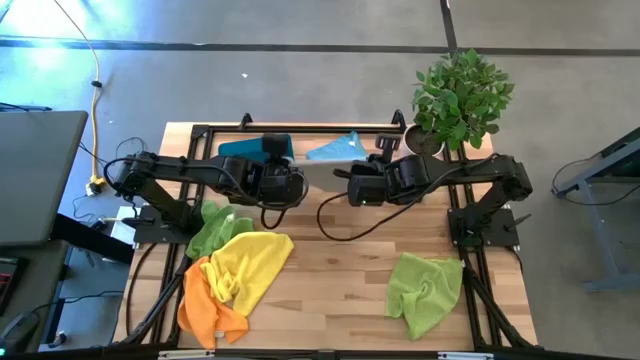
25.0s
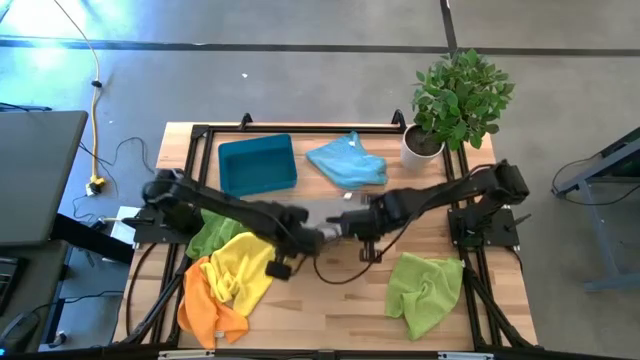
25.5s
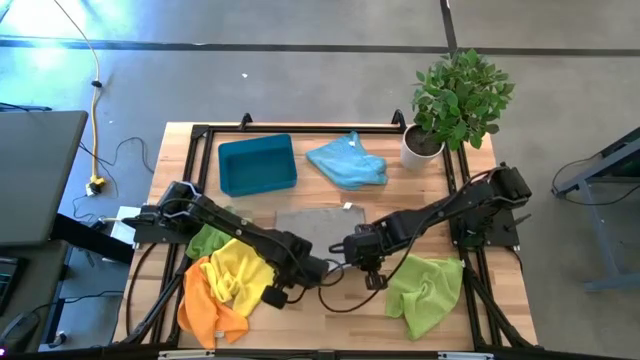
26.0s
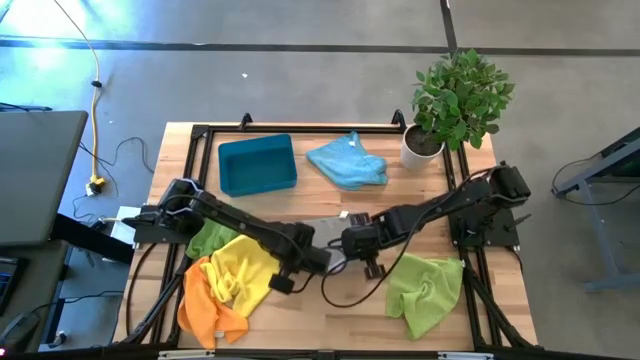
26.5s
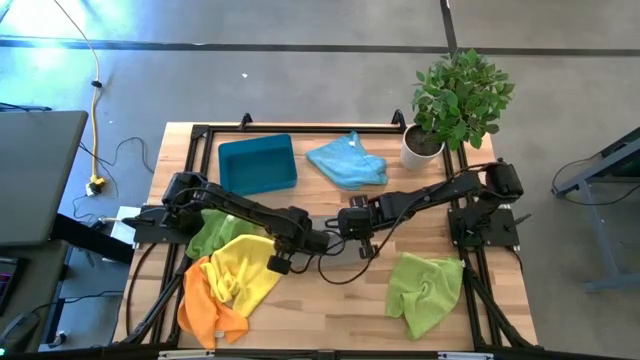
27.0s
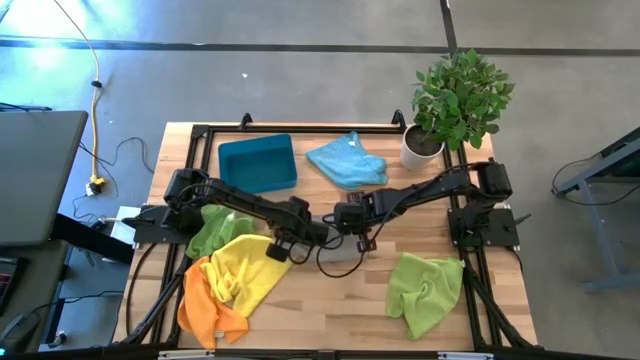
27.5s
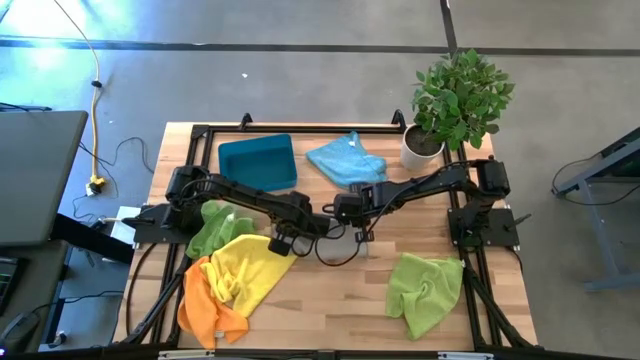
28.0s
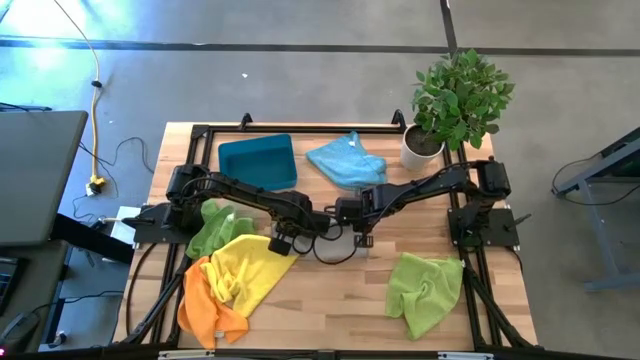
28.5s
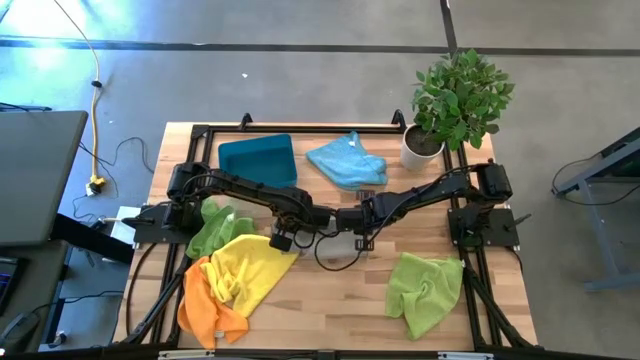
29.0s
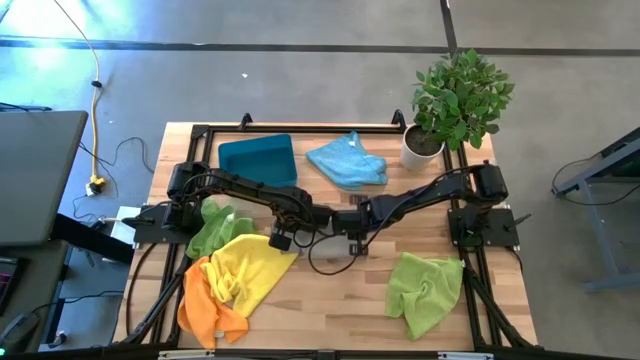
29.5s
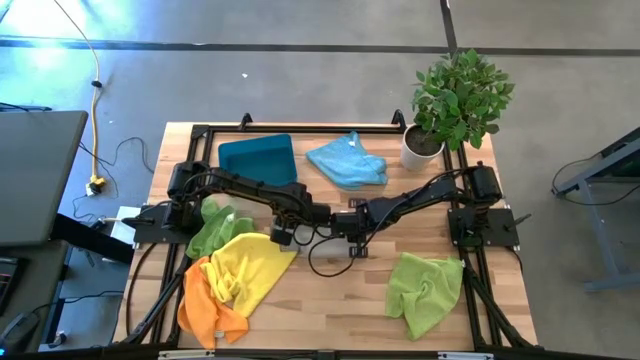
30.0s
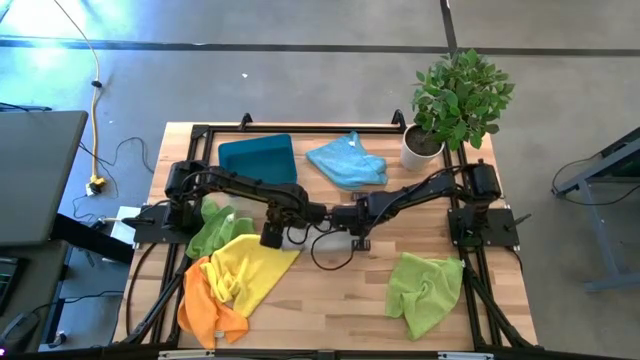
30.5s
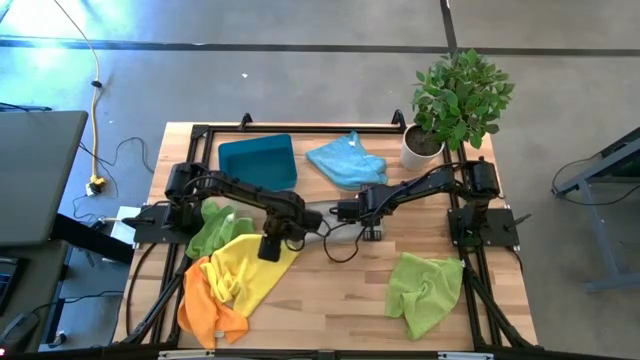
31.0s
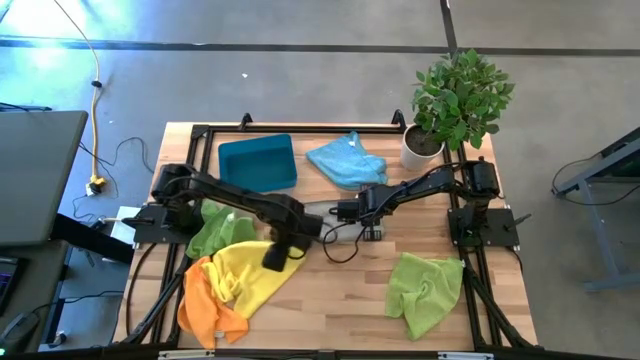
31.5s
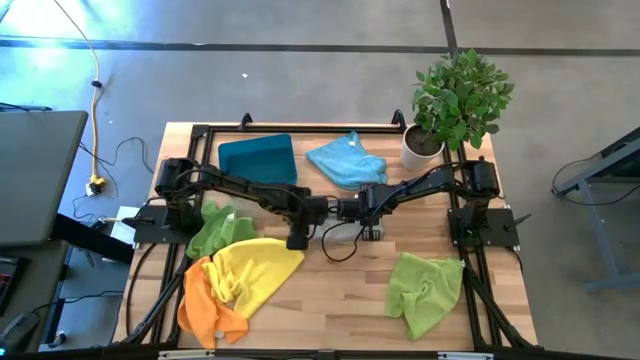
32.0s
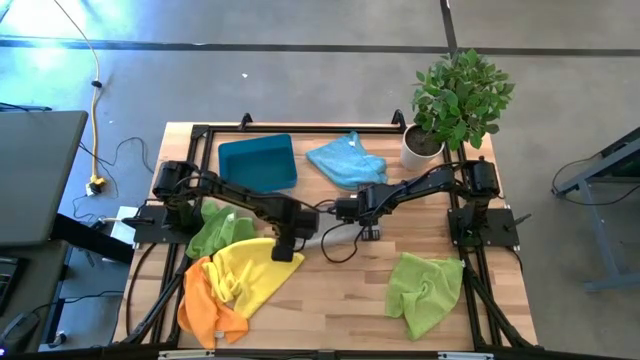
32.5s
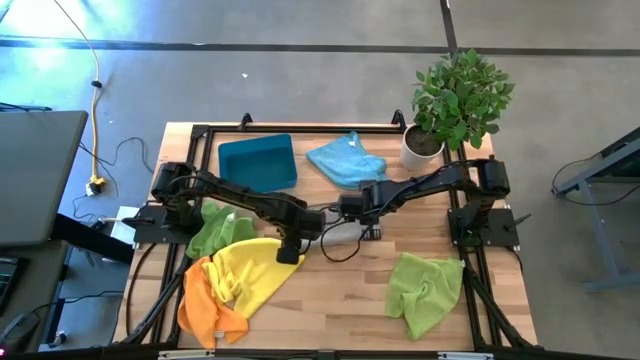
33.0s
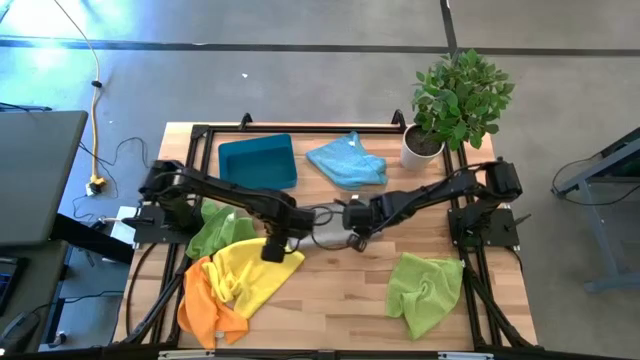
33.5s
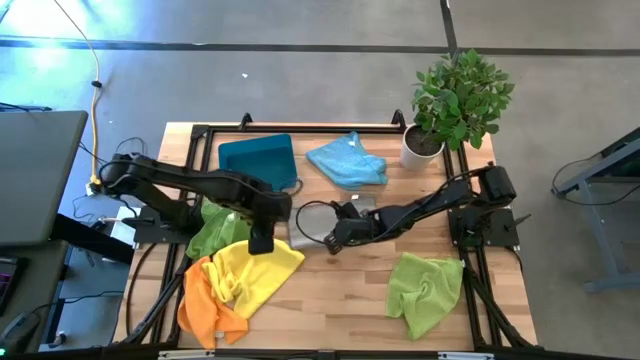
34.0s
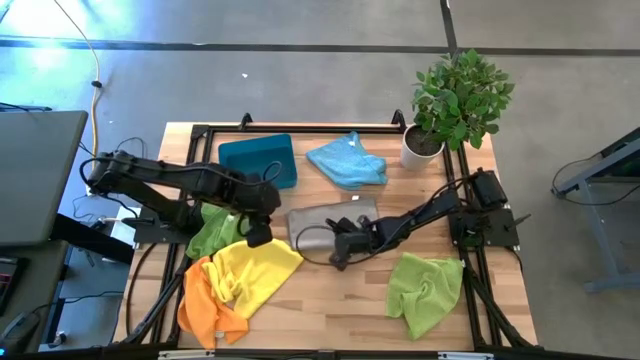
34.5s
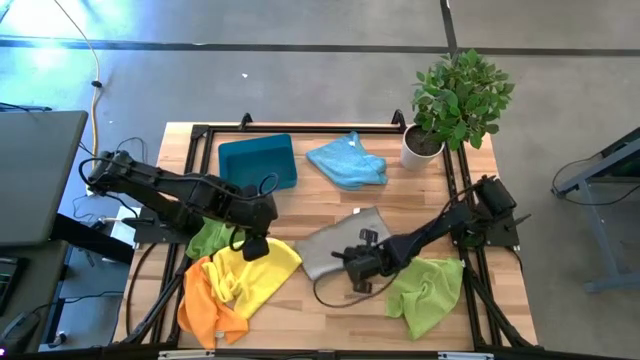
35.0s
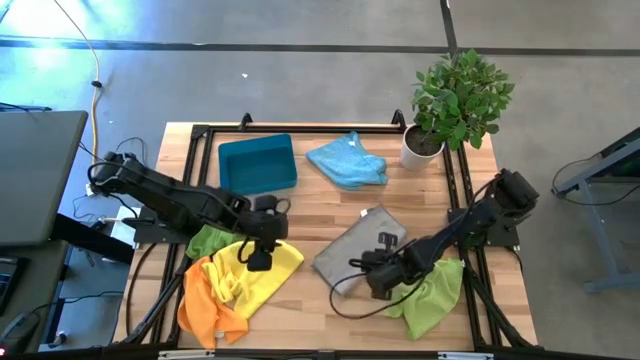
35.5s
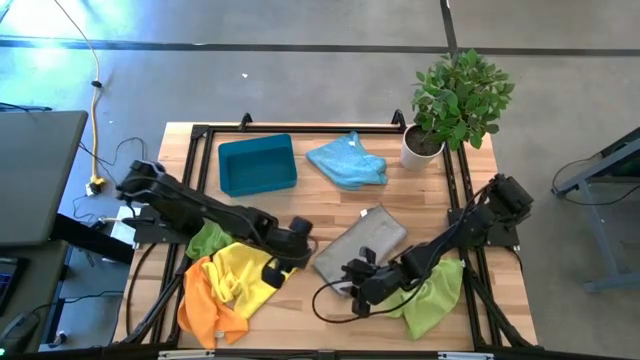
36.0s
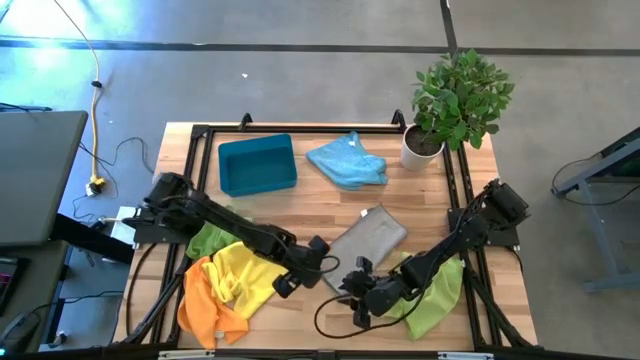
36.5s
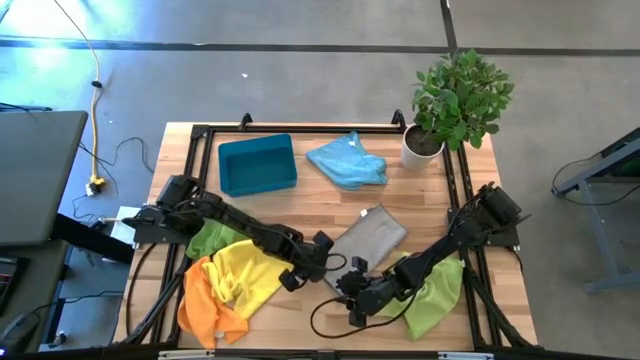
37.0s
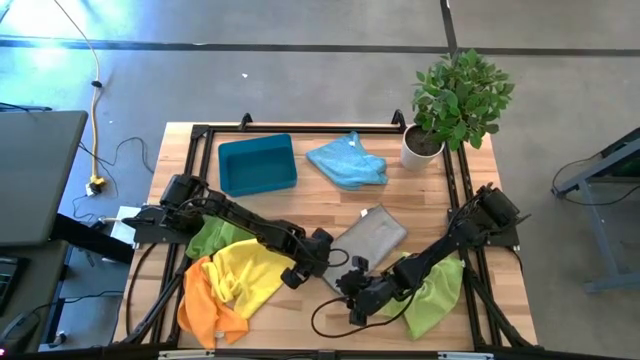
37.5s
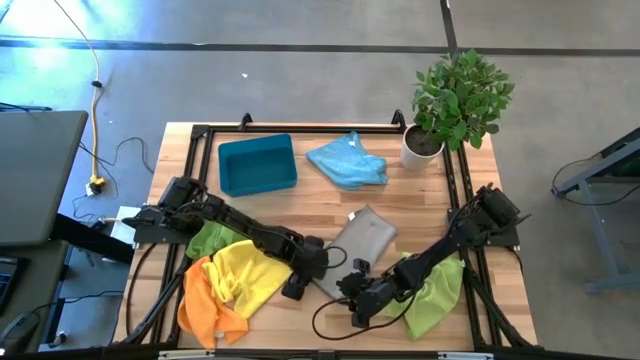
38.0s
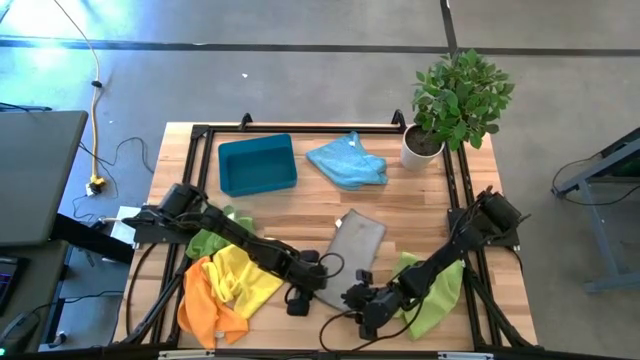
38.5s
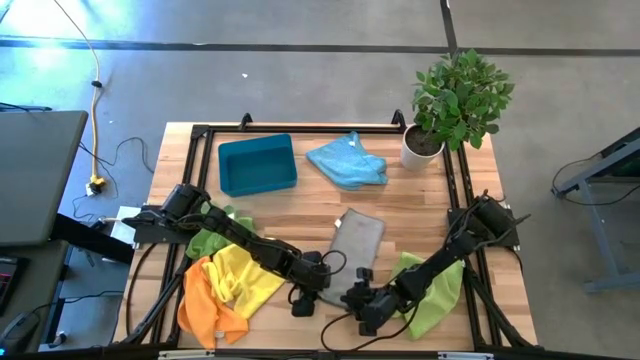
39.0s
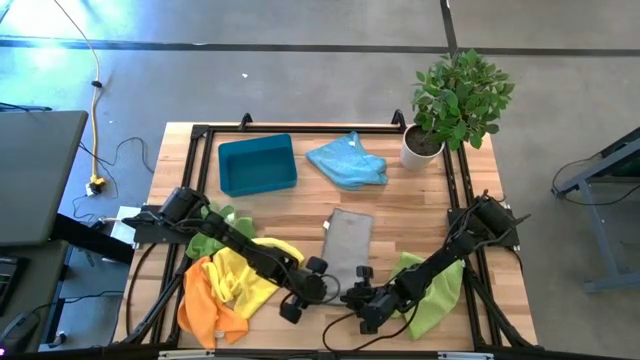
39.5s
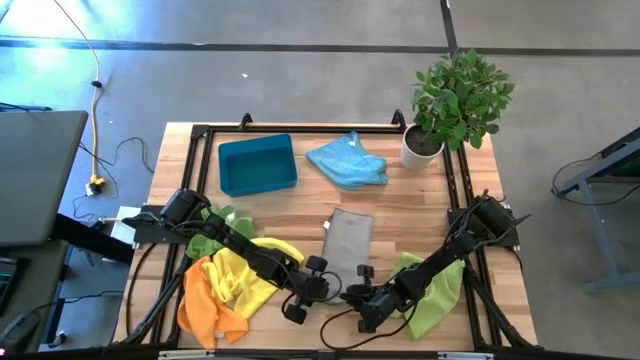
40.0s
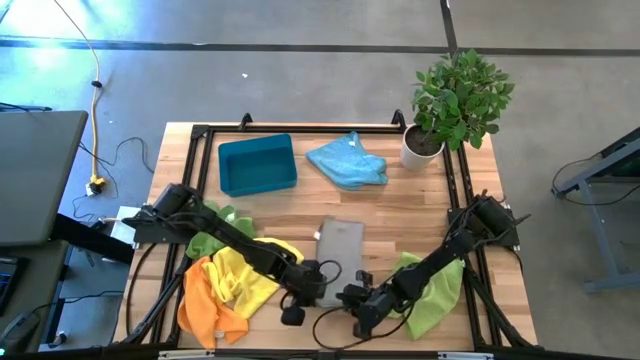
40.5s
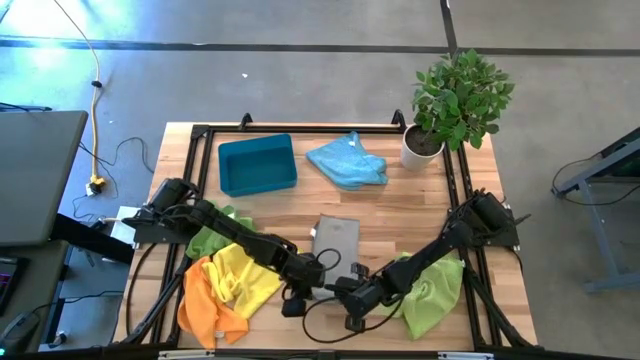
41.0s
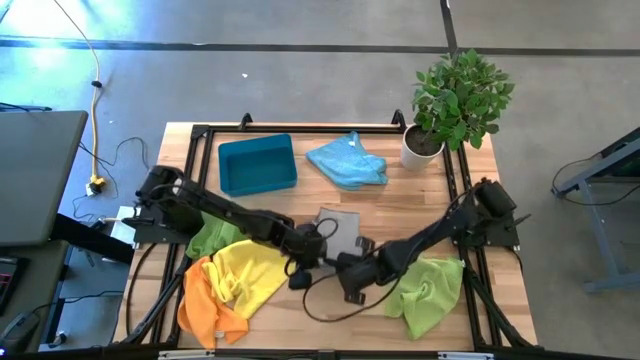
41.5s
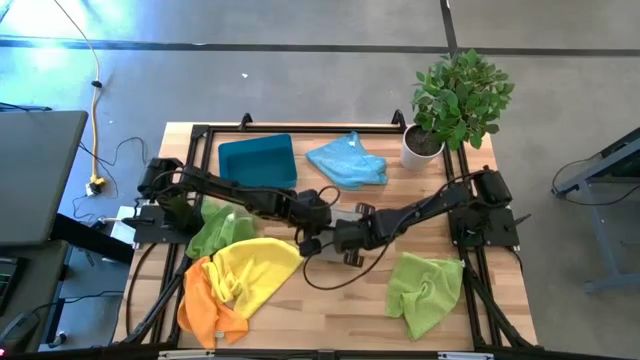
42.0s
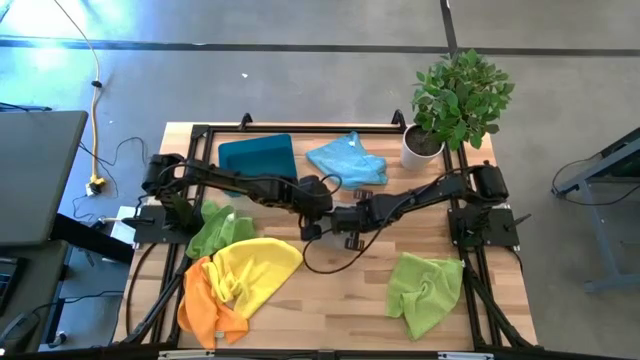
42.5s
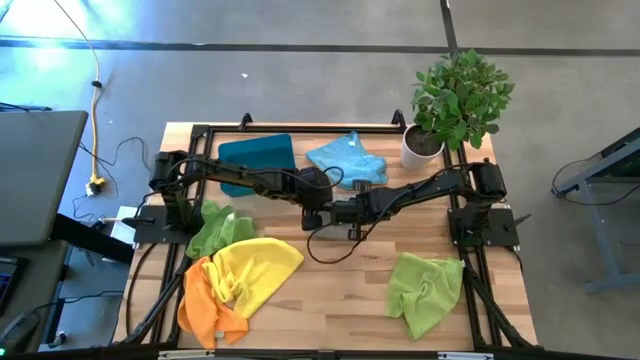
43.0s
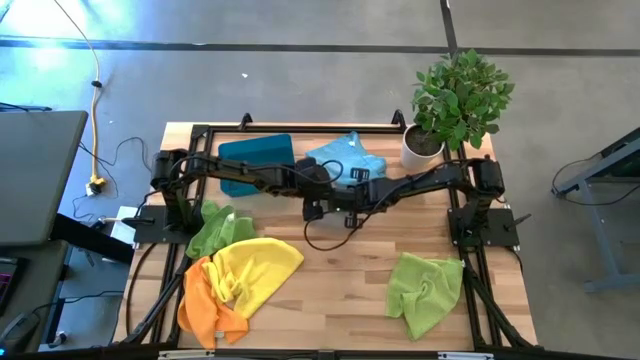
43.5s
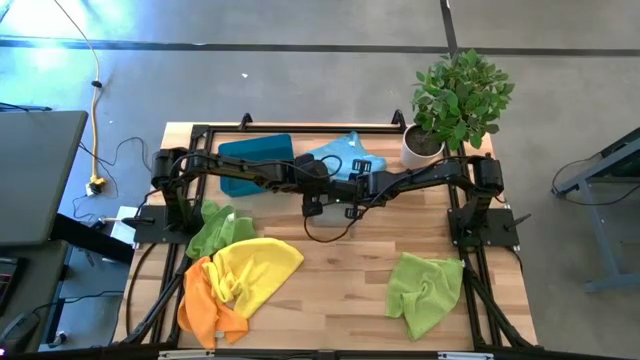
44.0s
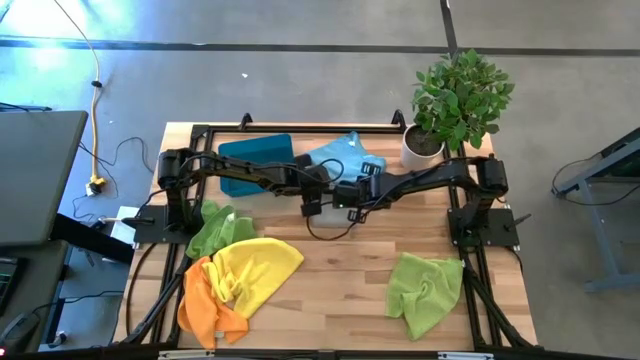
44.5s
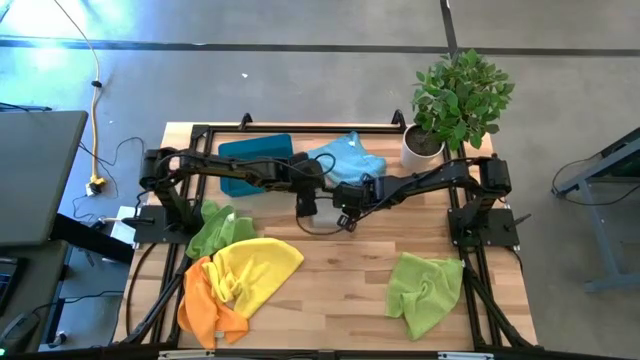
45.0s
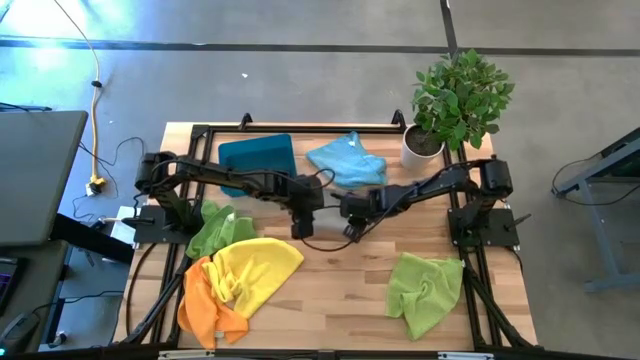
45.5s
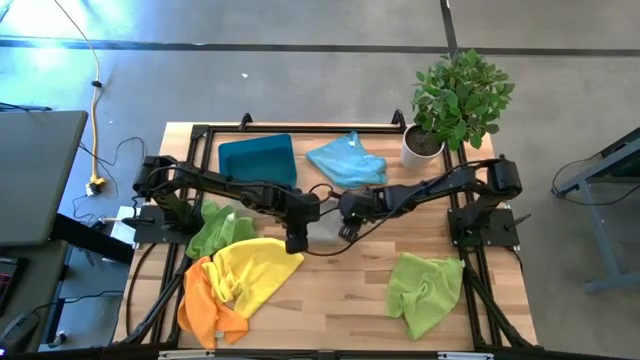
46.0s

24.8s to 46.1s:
Task: Fold microfiber towels
Fold the gray microfiber cloth
